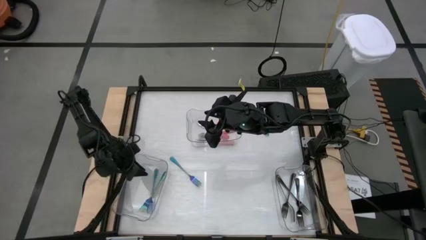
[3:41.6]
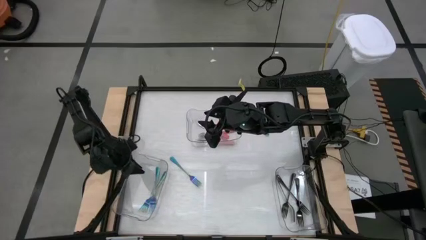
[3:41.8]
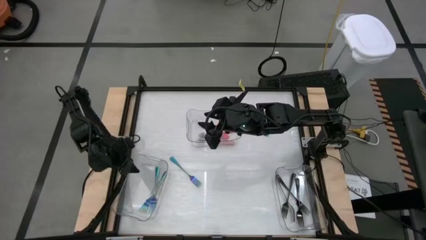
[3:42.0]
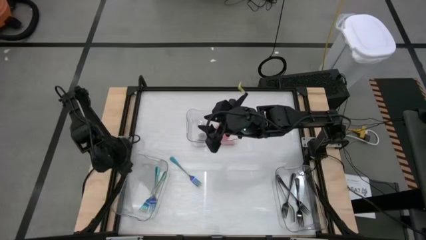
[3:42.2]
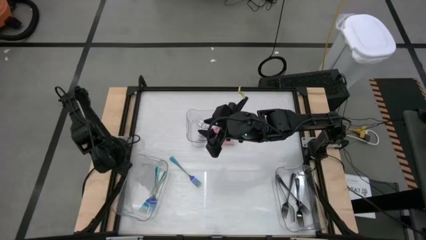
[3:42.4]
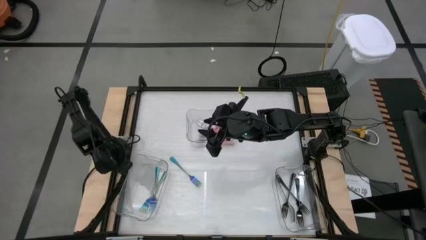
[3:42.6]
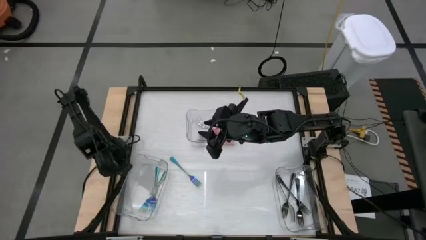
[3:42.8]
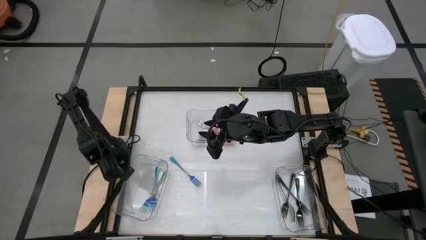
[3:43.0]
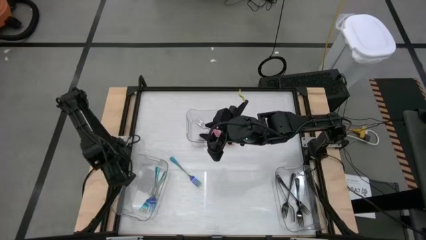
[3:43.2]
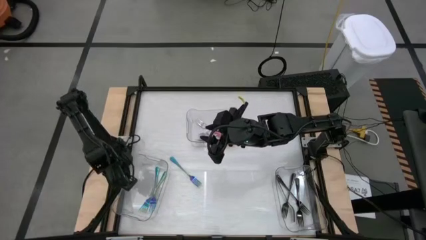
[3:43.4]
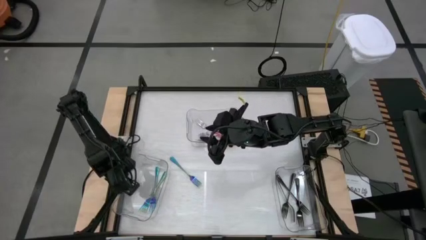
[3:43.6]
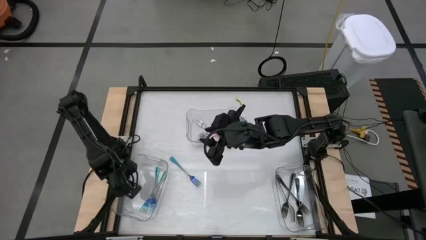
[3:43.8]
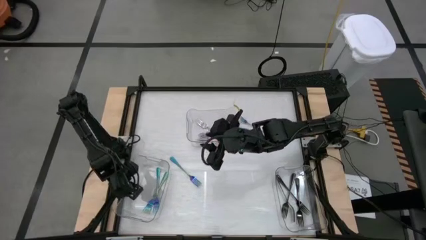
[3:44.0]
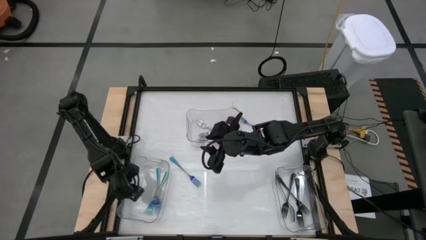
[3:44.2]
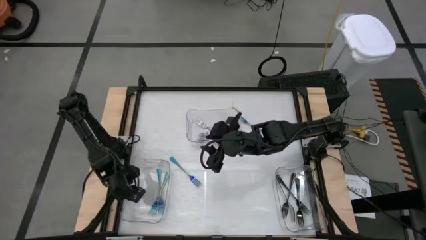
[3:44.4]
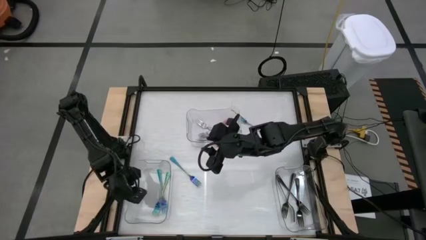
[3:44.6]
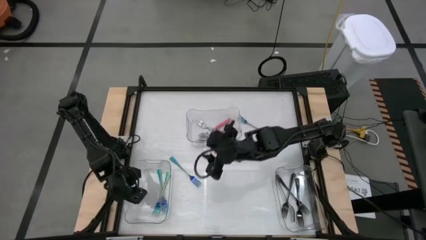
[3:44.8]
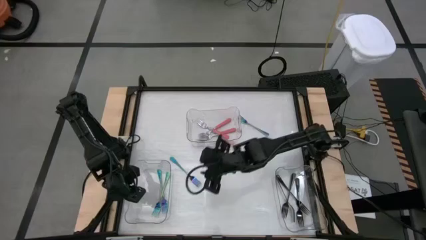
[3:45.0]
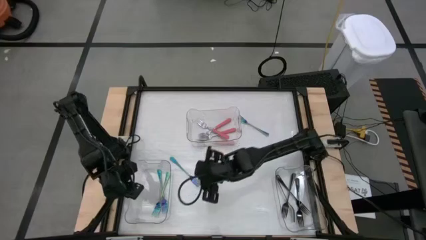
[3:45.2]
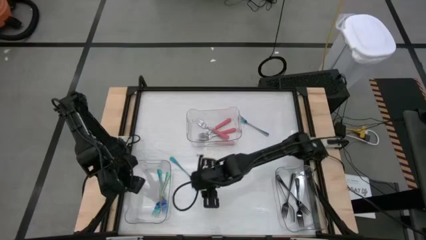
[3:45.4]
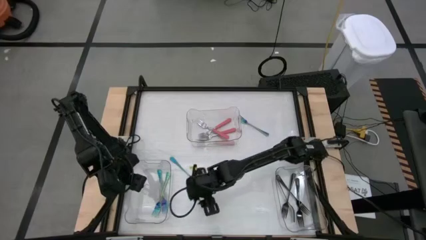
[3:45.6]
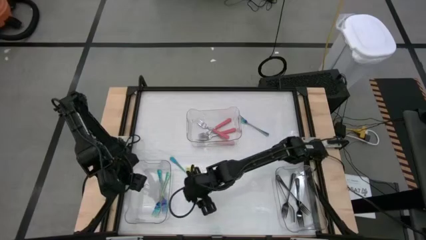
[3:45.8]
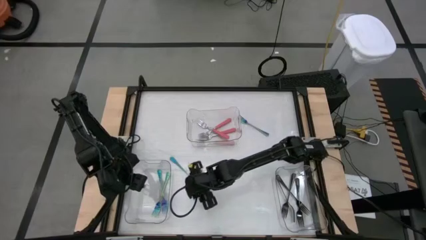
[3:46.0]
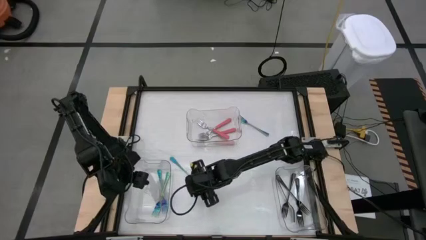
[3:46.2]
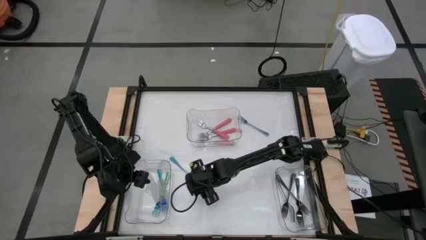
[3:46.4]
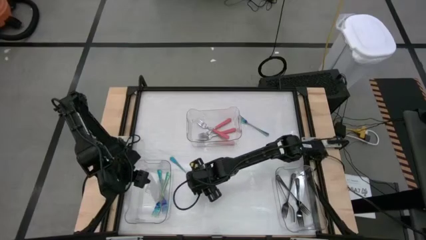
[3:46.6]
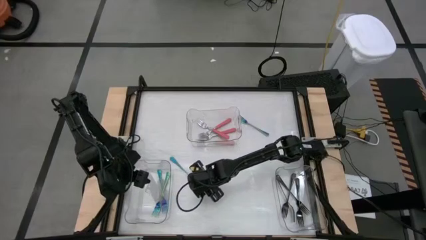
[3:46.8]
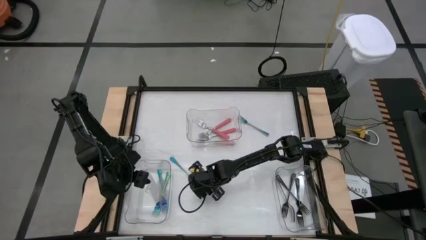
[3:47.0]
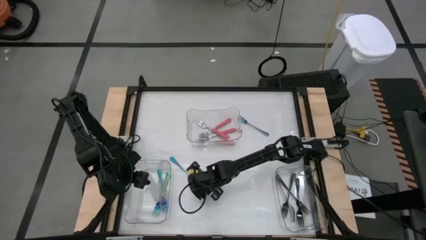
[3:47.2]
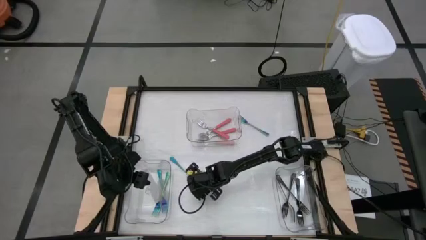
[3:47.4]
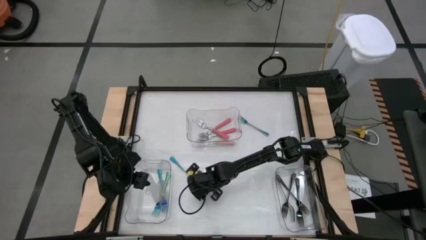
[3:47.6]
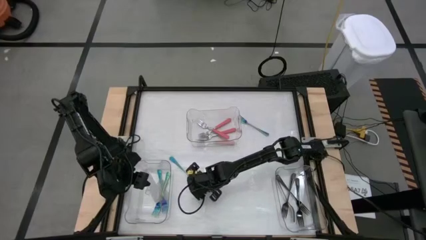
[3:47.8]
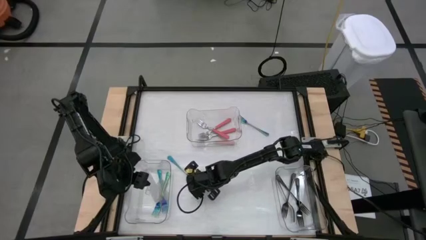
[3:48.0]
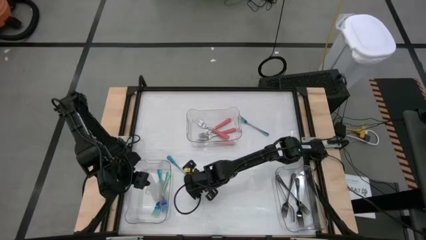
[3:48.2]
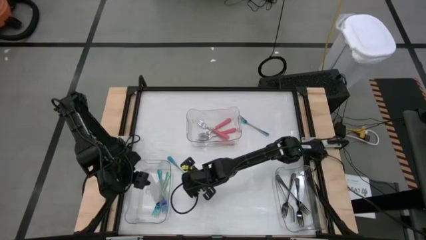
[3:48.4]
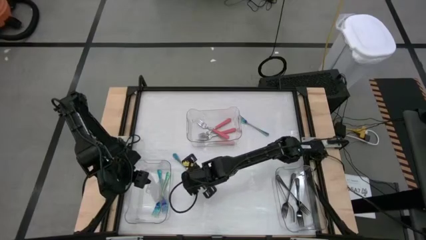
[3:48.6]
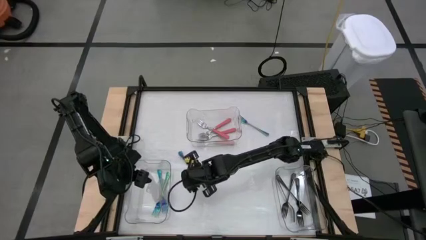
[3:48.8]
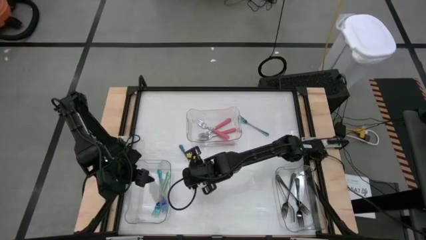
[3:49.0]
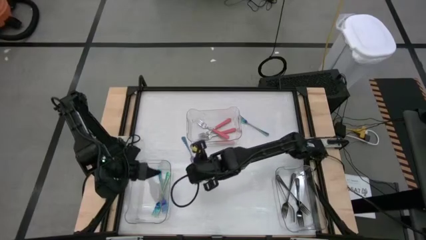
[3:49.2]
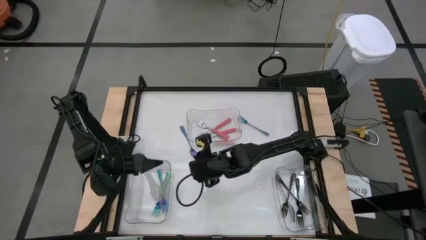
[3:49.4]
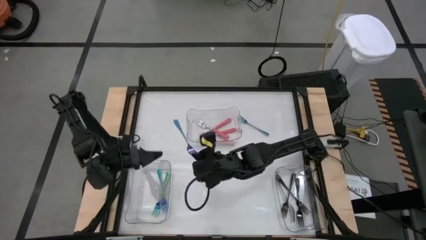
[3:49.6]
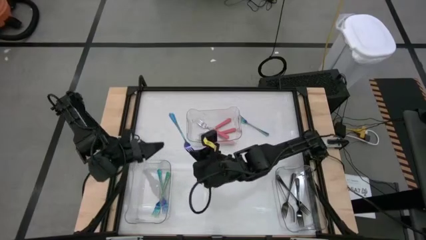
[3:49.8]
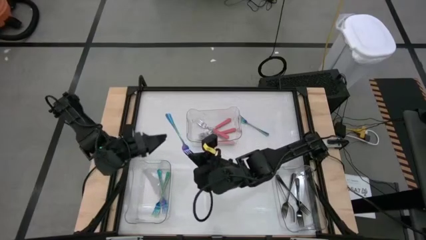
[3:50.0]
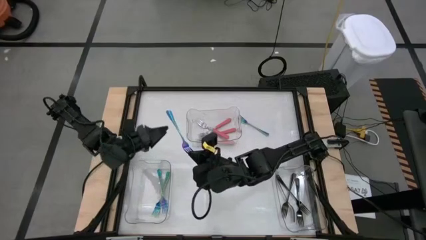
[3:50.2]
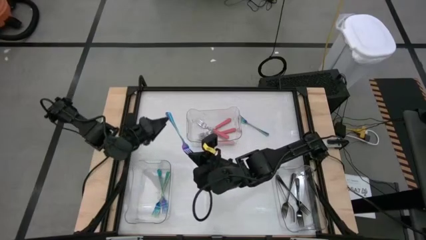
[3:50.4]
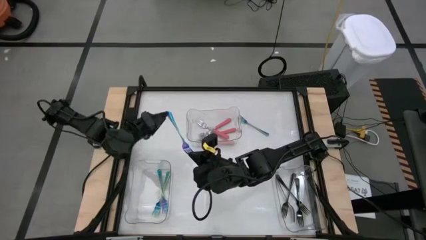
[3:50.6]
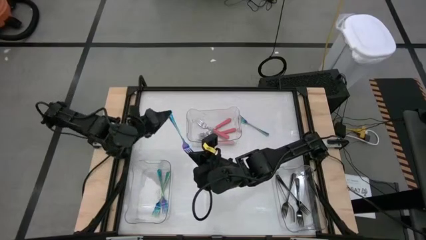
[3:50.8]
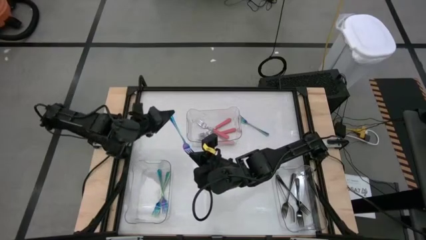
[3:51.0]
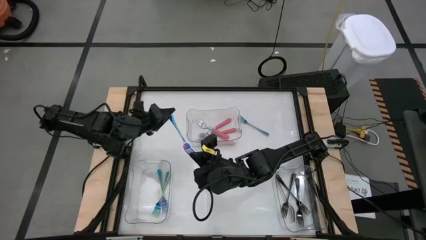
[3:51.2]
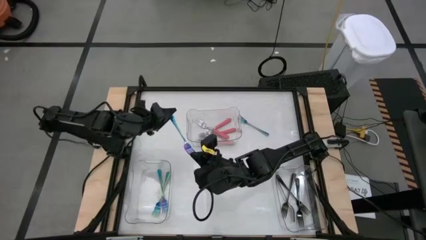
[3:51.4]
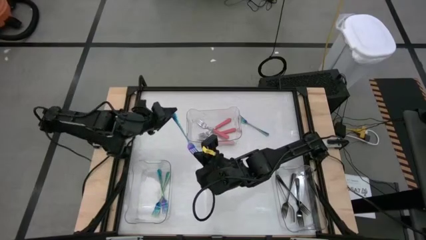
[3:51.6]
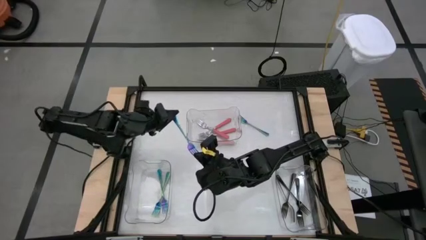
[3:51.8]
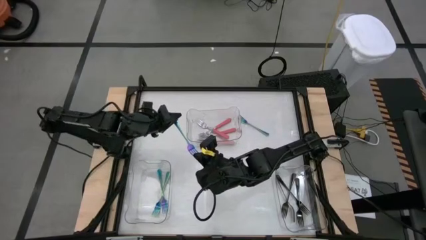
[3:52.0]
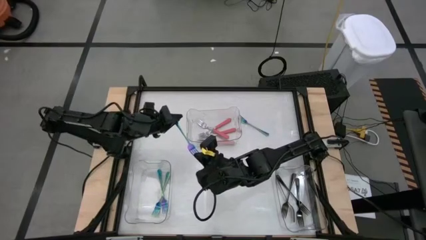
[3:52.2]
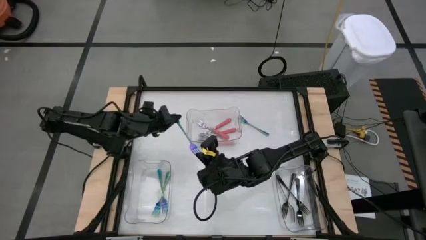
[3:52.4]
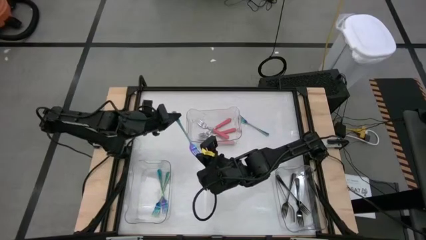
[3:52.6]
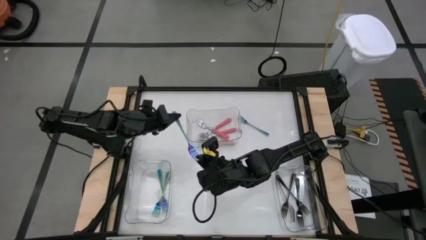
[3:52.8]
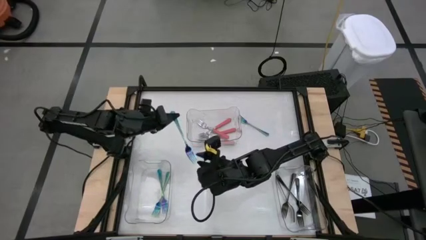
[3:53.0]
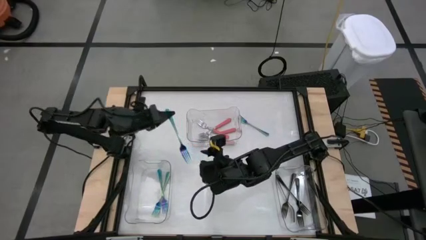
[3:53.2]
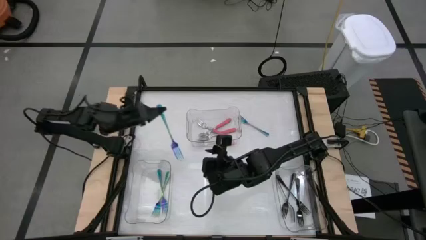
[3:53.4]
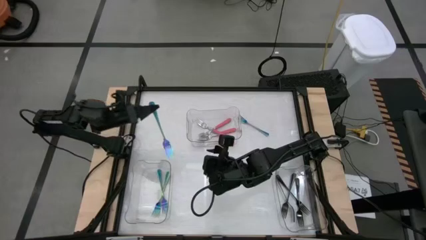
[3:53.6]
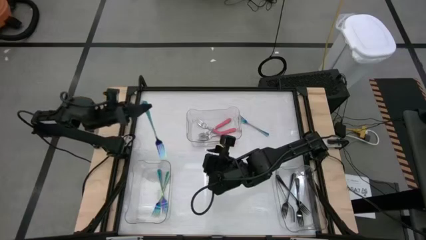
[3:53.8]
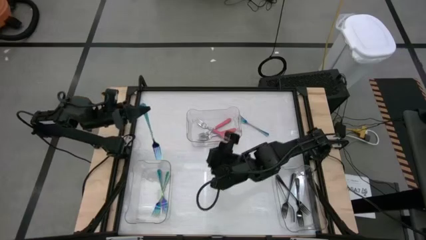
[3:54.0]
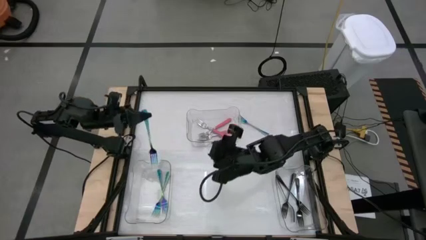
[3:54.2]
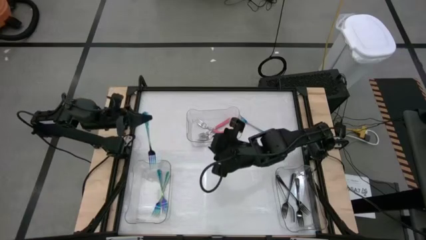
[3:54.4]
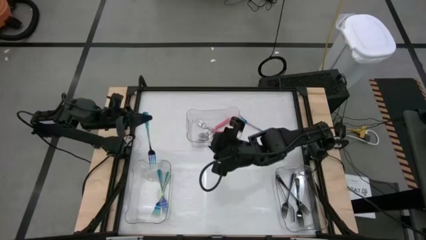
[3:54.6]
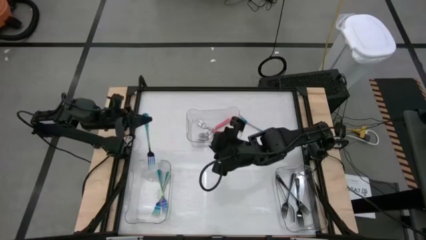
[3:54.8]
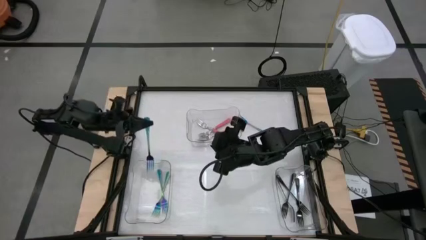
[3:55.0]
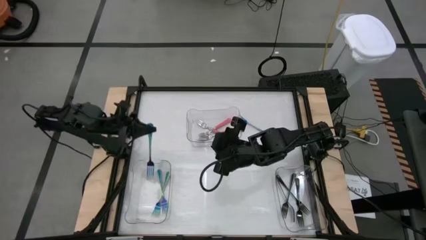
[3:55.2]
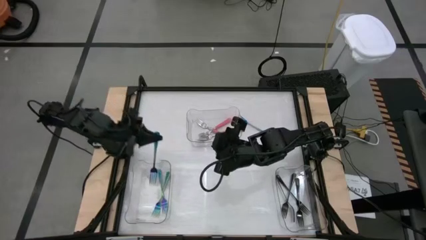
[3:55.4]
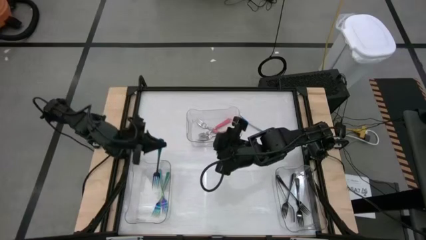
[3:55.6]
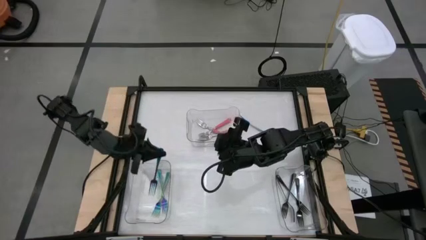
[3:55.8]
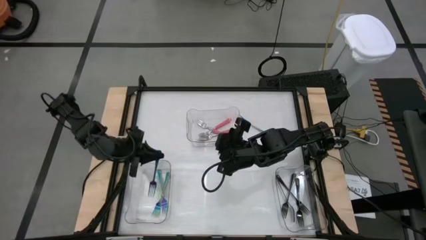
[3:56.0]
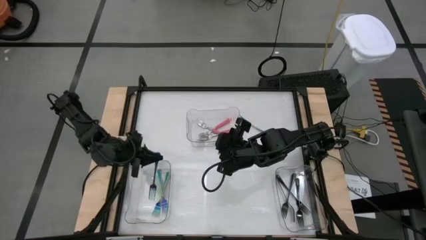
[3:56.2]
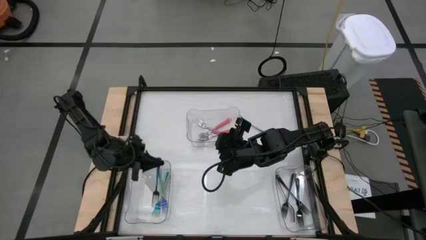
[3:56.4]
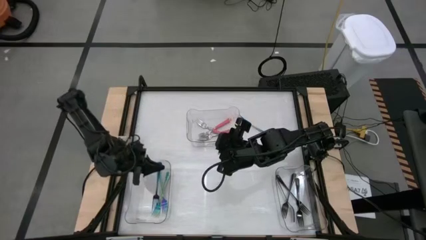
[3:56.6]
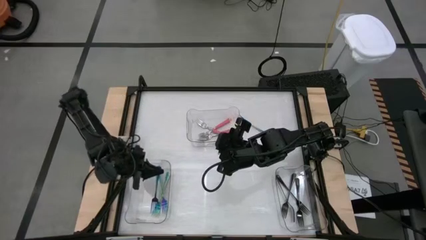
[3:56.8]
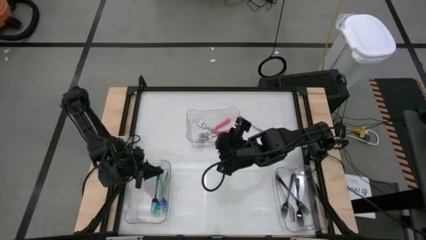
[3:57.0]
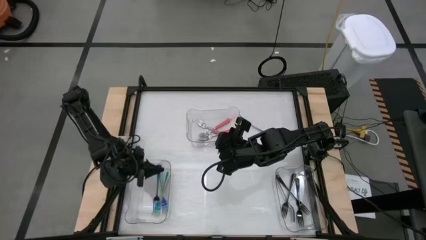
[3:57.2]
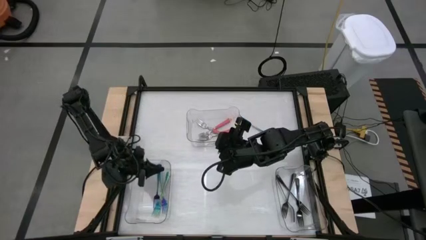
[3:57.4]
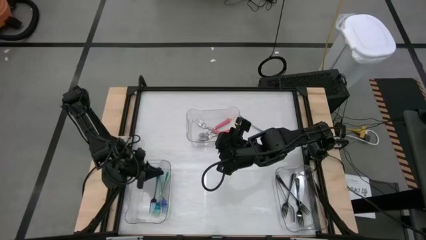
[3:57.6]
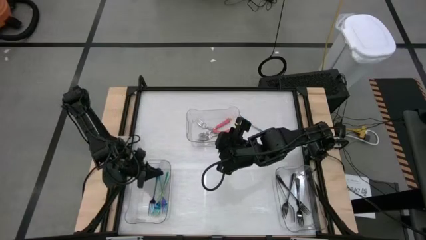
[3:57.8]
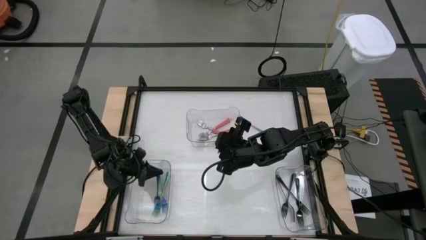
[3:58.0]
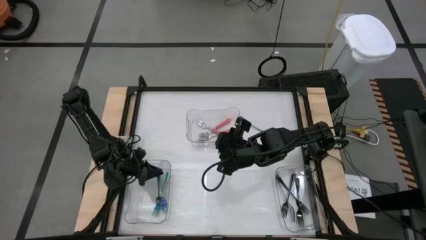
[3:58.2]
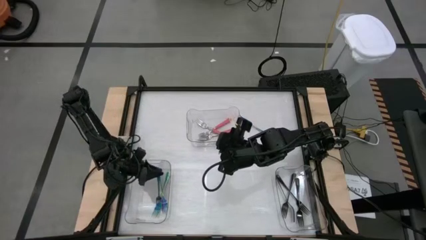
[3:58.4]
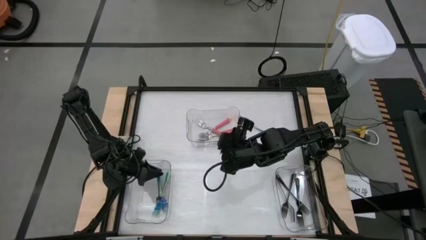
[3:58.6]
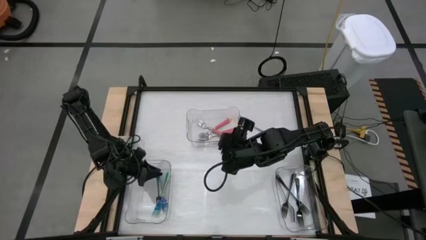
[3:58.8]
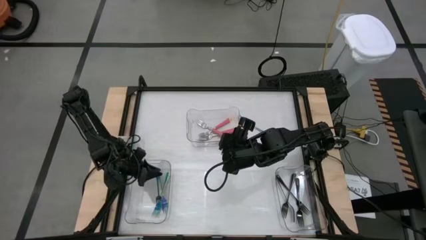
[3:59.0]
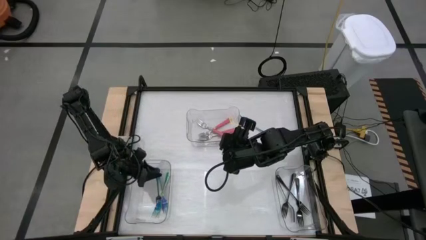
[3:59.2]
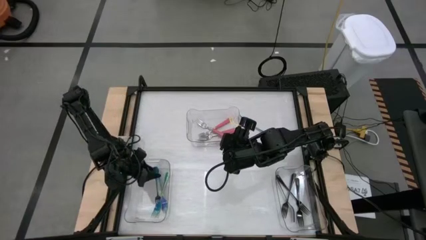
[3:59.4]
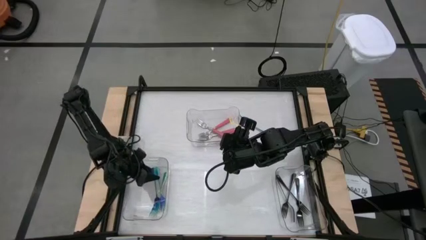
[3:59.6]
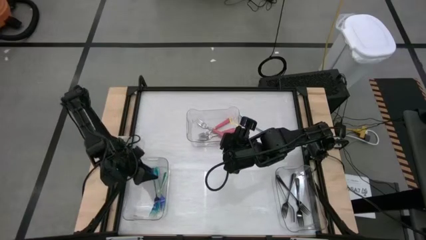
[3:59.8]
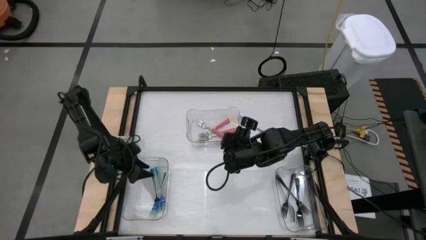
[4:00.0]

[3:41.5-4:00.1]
Task: Sort silverware by color (type)
Put the blue fork into the left transparent bin
